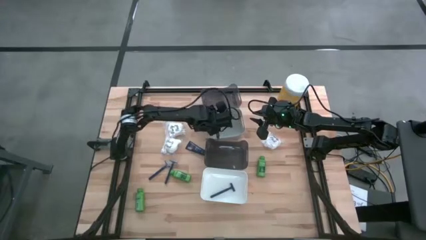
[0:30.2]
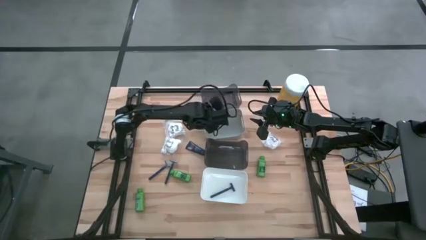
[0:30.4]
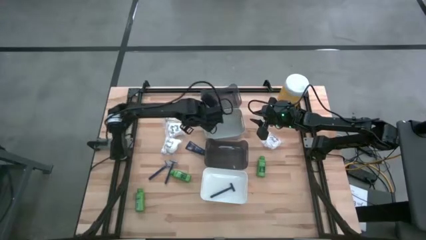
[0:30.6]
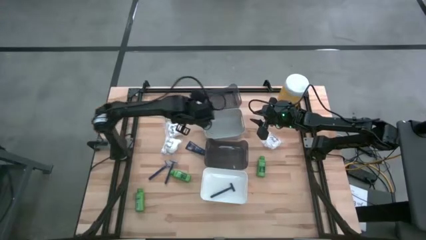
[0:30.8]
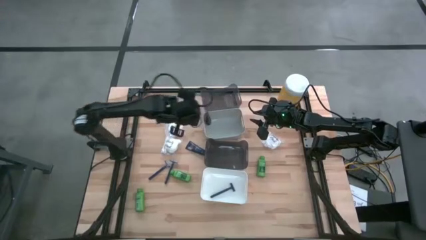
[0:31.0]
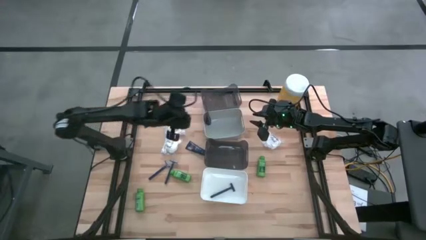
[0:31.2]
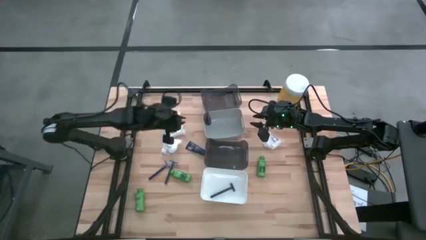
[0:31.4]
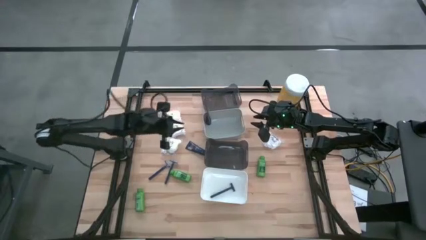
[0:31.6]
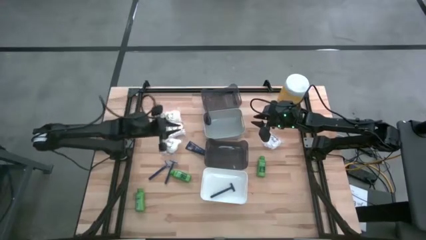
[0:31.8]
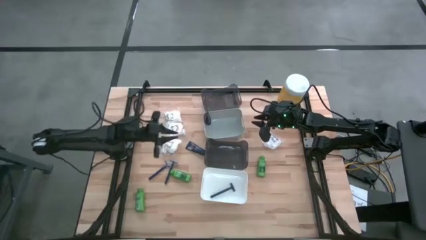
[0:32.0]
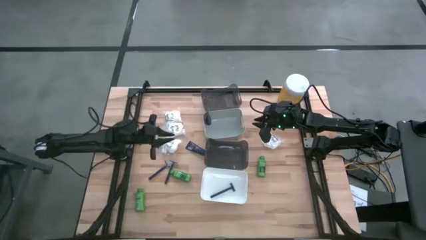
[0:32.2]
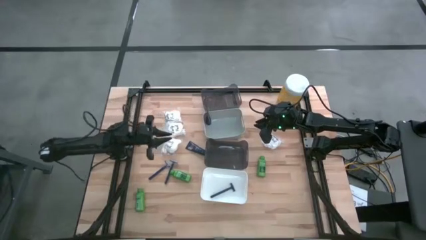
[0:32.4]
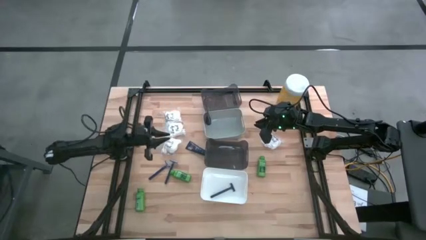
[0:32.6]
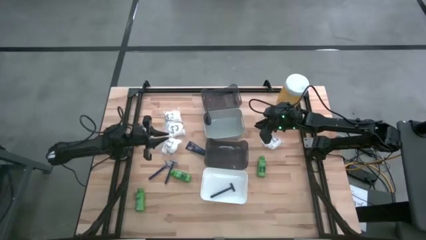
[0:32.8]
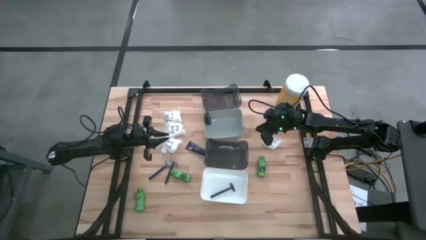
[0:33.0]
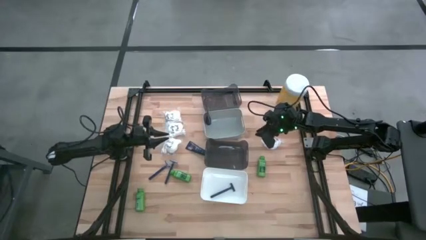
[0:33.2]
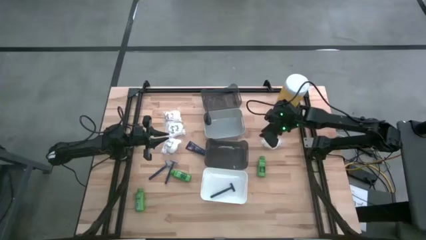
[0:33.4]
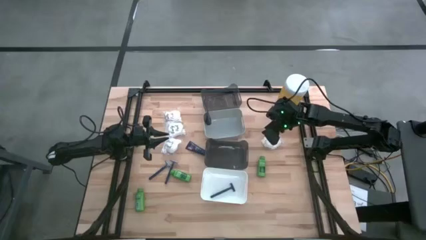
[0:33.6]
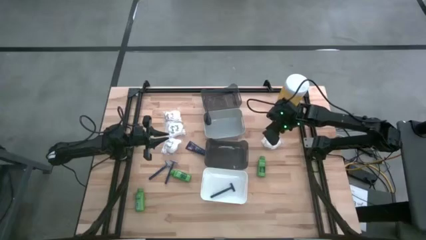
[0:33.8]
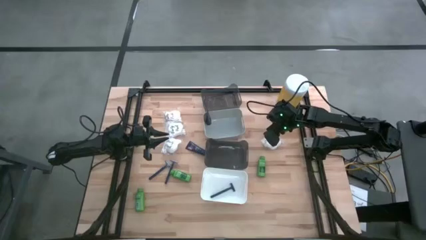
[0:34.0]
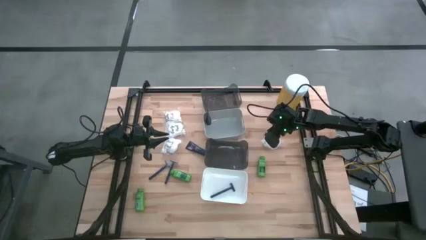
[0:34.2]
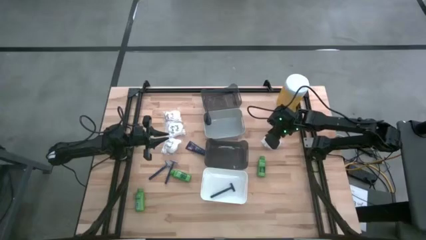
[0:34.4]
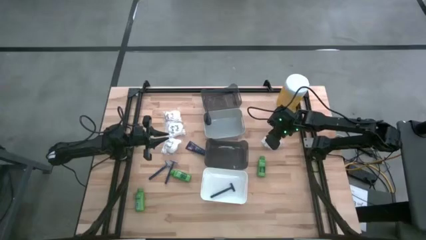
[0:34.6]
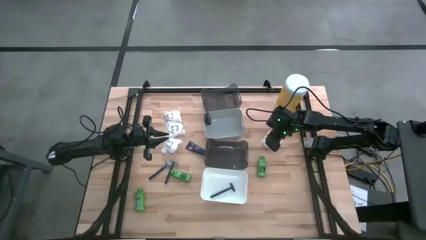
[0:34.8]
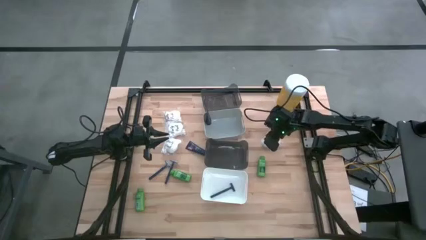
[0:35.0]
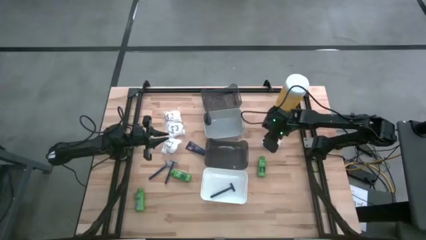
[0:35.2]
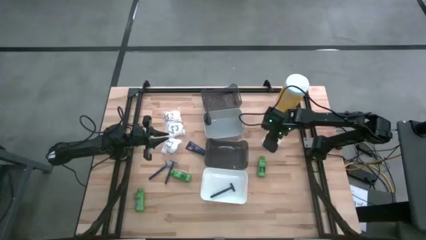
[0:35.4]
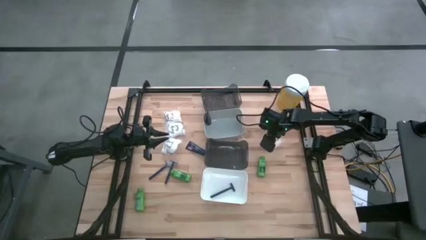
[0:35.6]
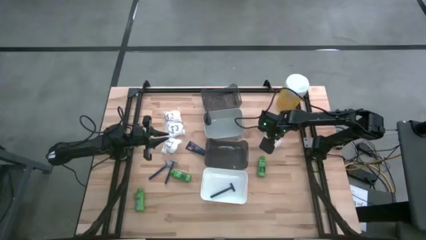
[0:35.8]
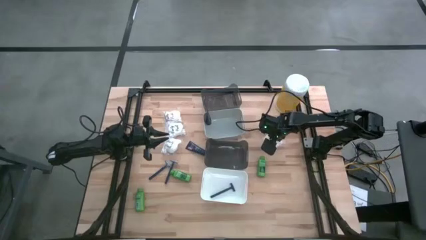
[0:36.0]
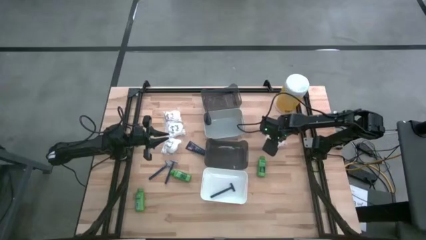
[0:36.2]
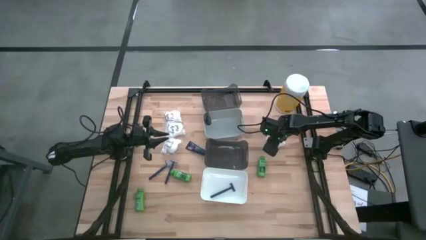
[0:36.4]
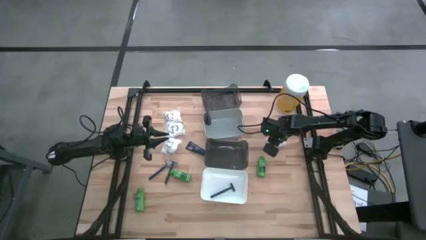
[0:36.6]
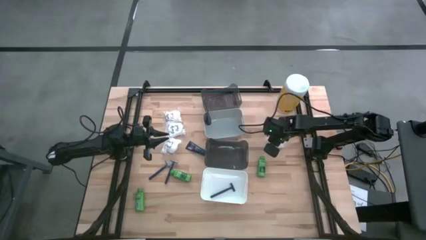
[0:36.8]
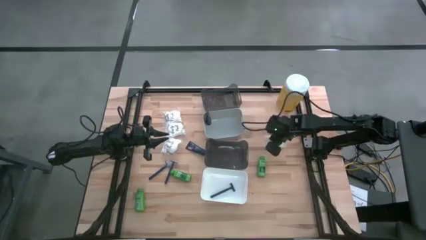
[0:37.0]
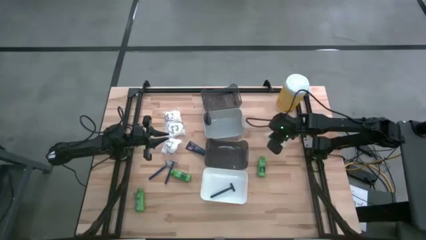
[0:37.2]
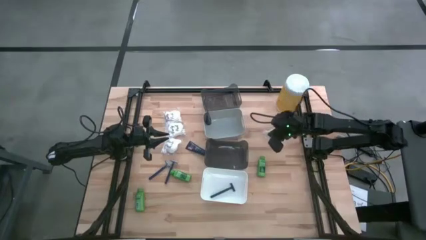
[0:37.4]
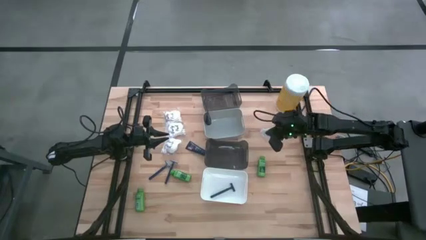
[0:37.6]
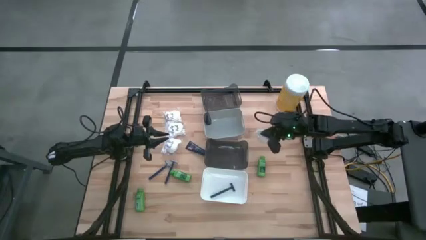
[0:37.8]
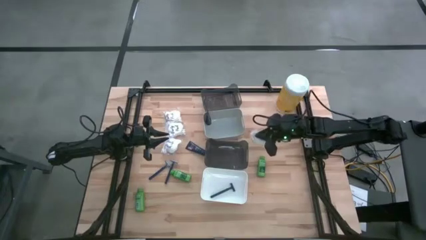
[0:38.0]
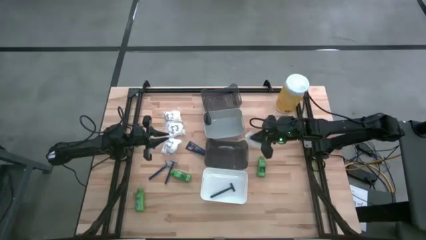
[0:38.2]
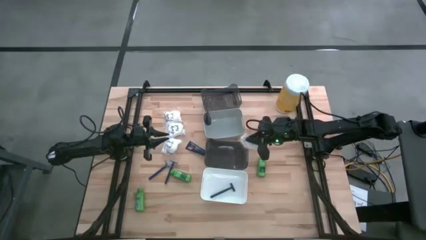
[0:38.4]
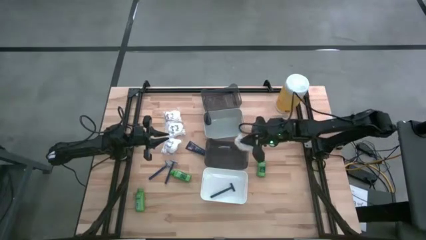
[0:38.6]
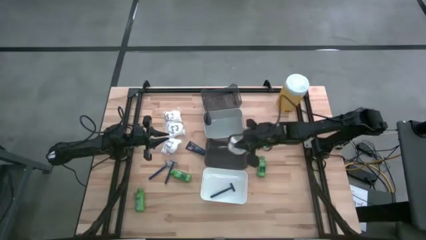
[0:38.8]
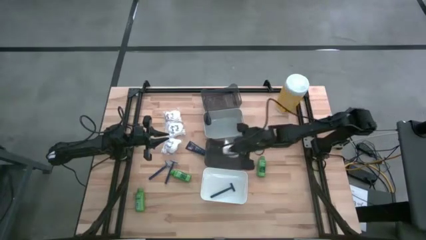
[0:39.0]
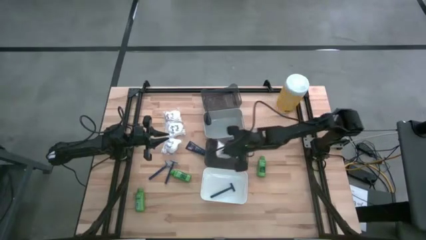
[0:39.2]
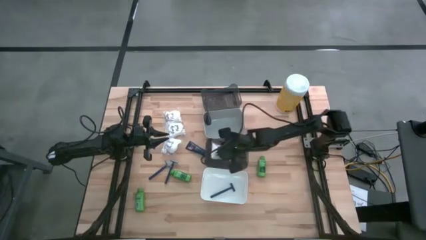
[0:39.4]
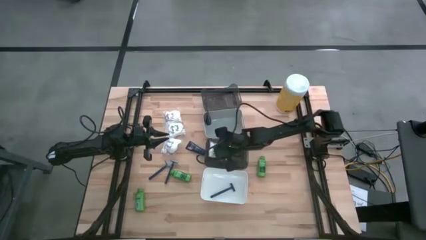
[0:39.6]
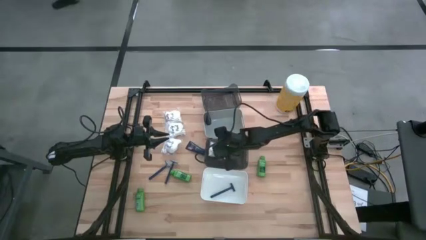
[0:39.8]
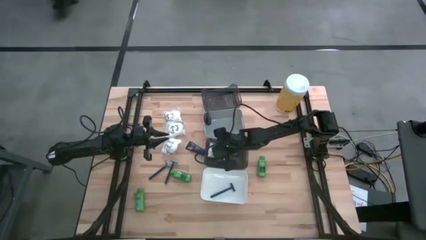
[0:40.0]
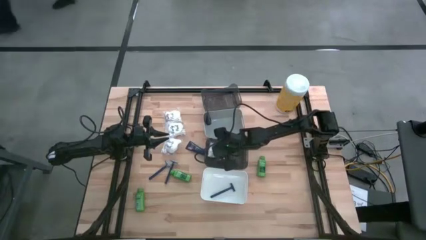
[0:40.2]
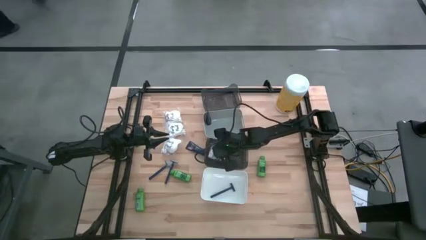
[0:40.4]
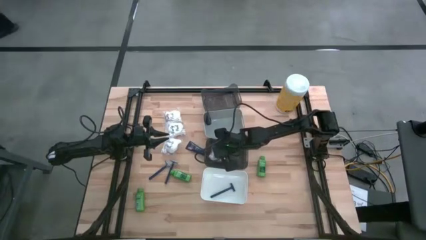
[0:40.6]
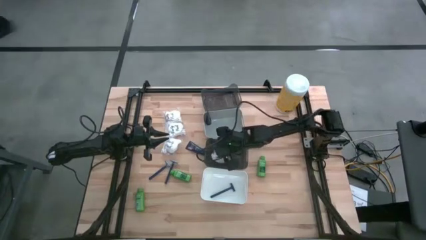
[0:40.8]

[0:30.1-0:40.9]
Task: Pick & Place Travel size toiletries
Put the white cotton pack into the bottom black bin

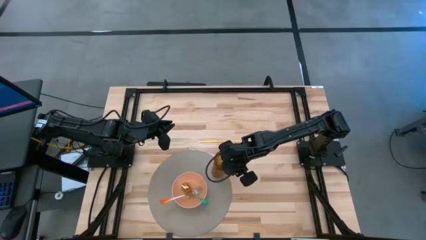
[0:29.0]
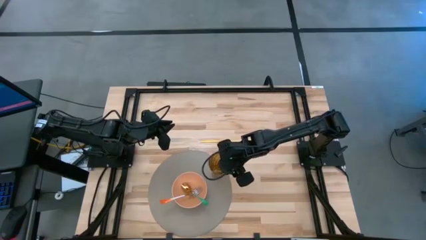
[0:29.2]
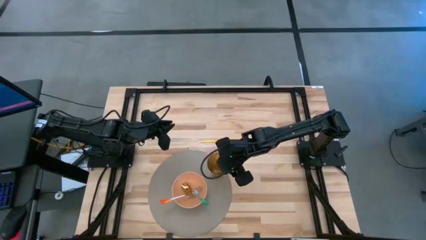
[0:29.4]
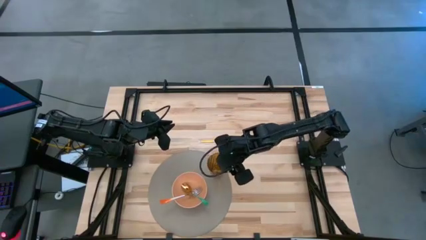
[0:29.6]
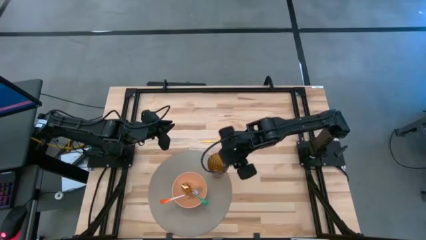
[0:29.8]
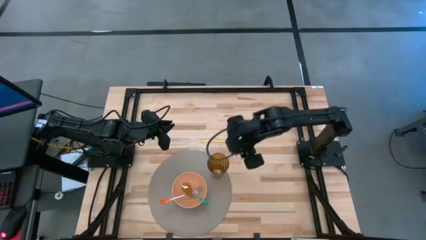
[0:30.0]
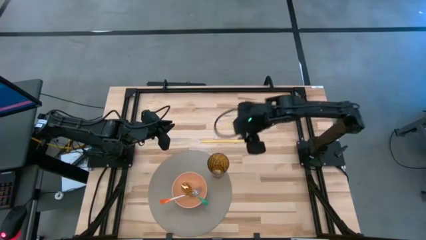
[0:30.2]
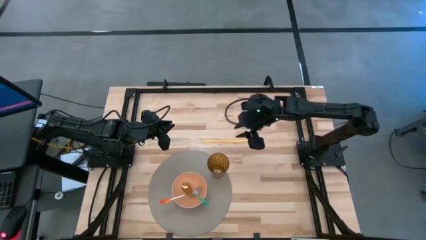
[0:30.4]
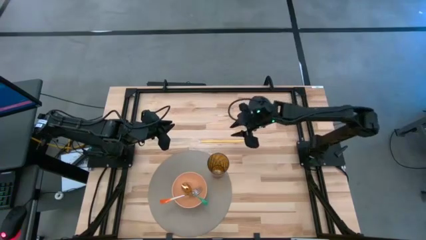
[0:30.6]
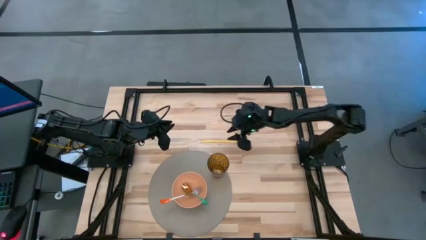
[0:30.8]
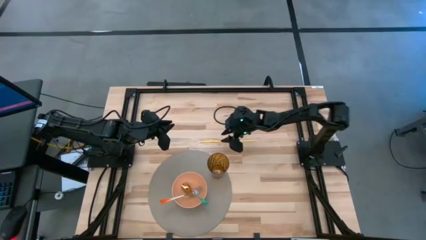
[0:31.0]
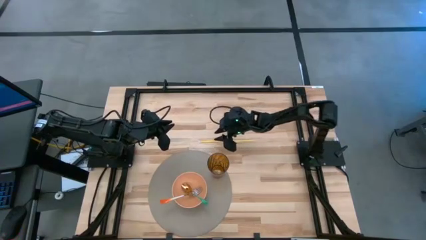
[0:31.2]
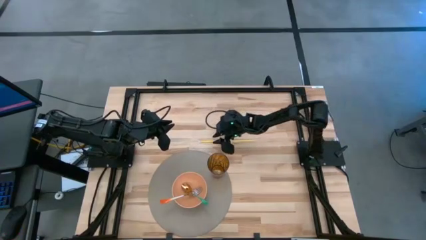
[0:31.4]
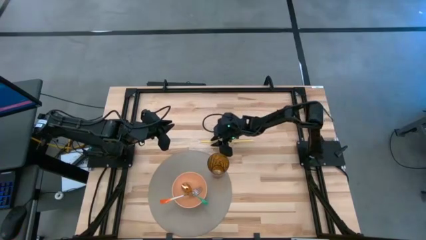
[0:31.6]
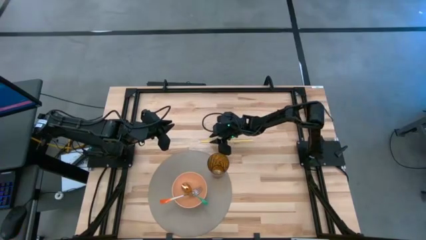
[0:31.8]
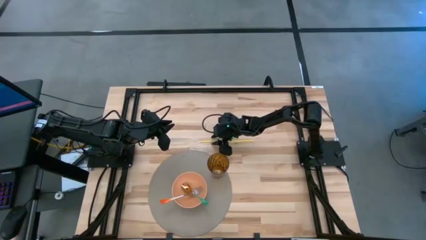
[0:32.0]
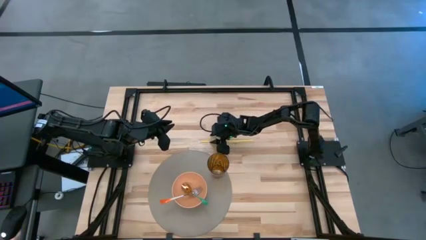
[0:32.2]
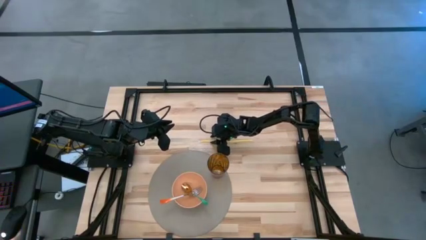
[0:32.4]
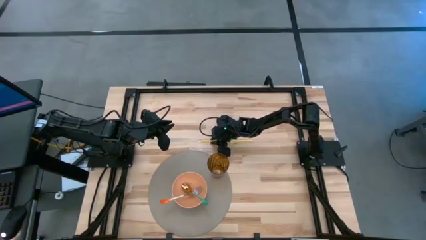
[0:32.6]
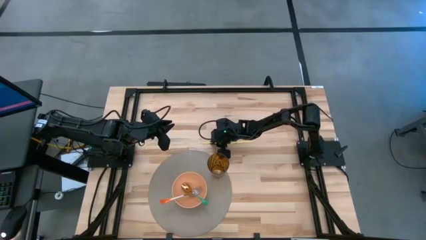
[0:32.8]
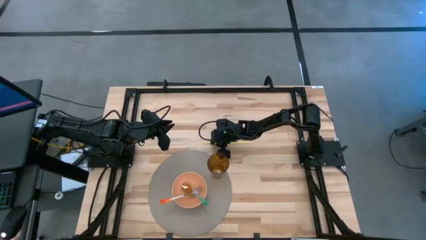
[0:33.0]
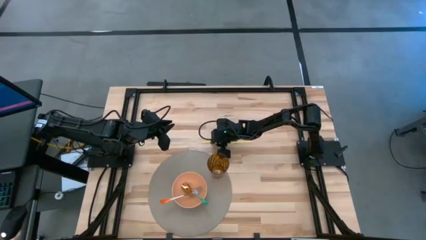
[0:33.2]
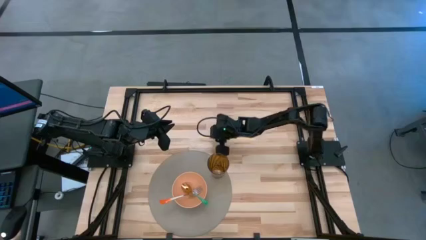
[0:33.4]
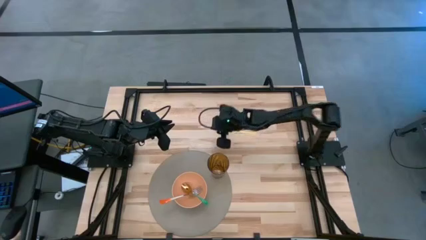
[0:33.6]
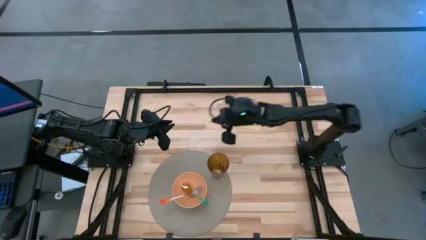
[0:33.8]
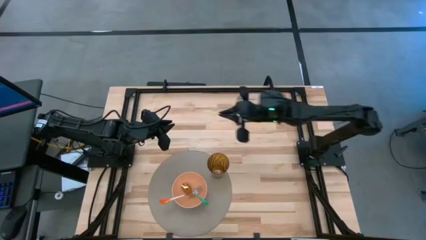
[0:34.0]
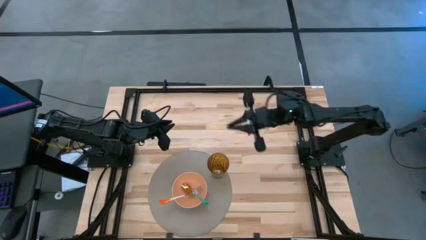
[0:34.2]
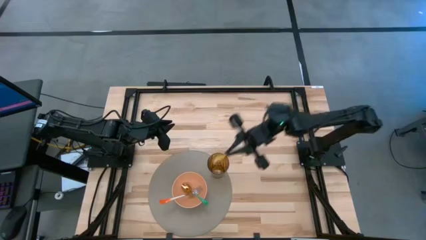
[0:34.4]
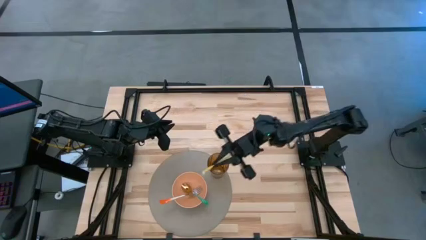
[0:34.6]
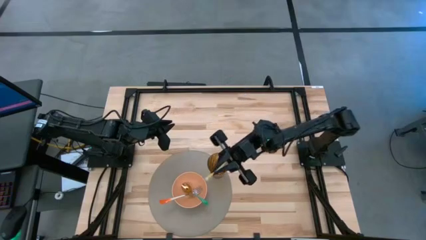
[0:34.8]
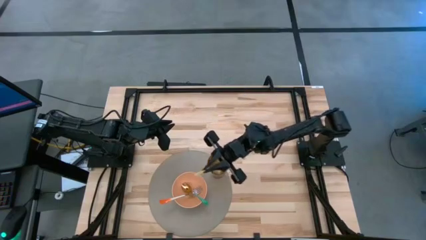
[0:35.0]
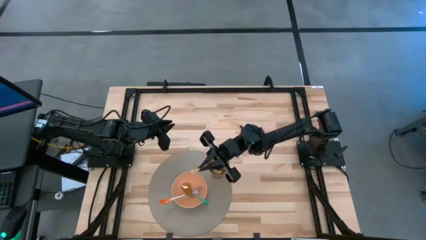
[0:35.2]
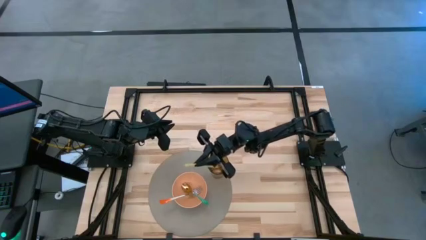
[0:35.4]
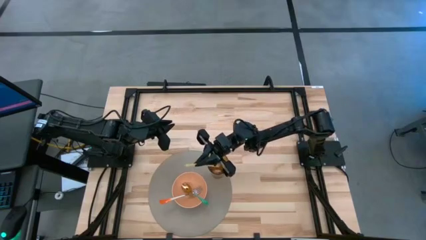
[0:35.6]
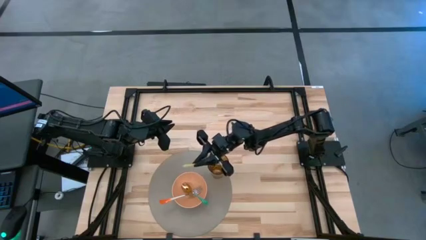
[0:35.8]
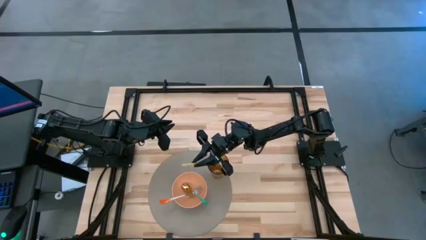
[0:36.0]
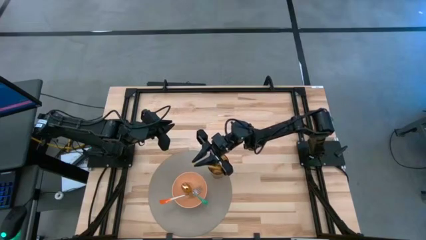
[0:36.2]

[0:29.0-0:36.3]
Task: Pick & Place Utensil
Put the yellow straw into the brown cup
